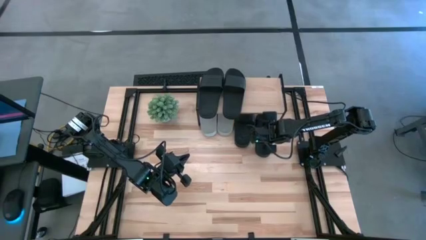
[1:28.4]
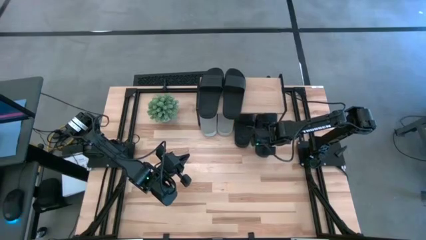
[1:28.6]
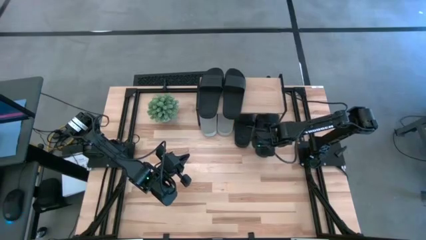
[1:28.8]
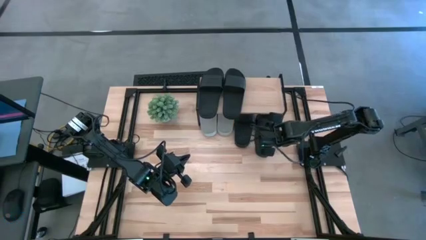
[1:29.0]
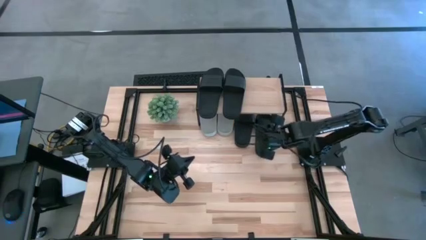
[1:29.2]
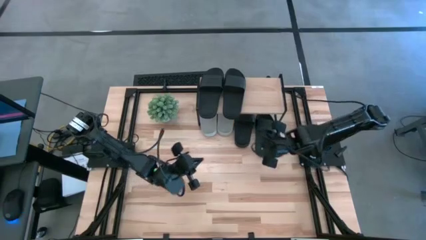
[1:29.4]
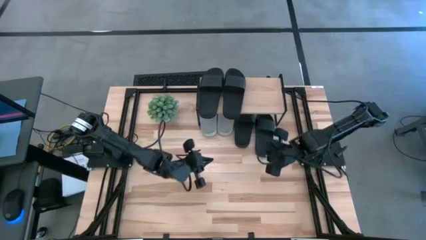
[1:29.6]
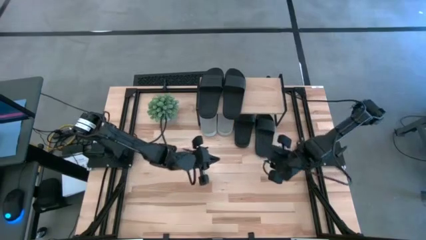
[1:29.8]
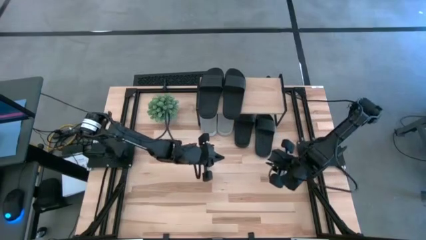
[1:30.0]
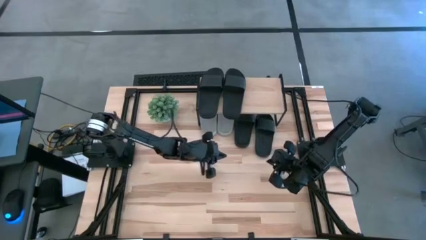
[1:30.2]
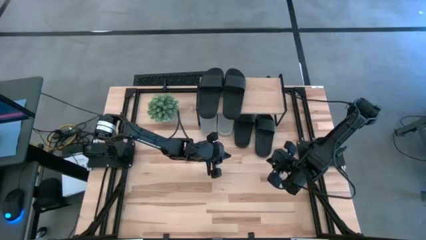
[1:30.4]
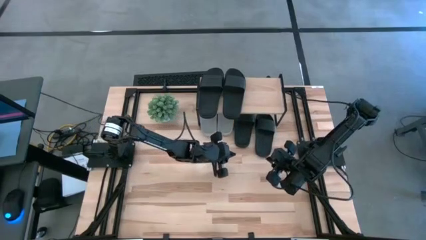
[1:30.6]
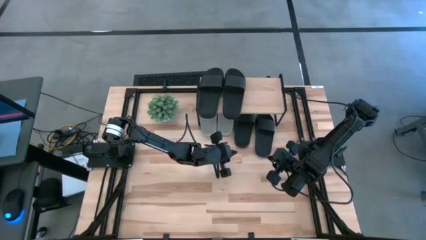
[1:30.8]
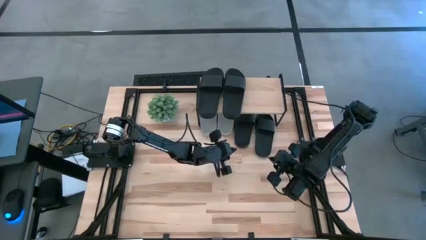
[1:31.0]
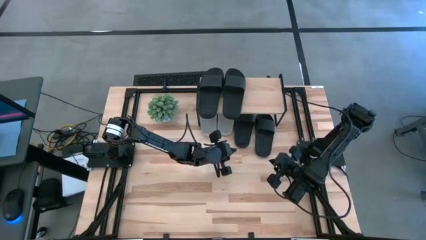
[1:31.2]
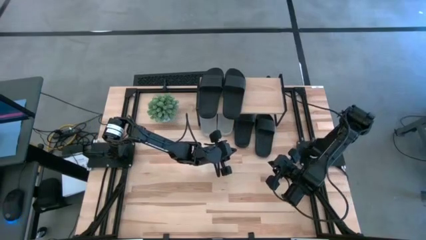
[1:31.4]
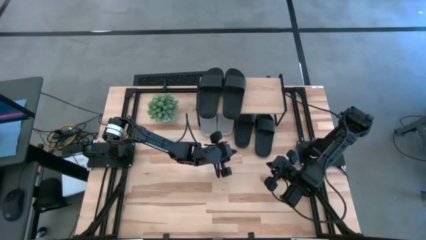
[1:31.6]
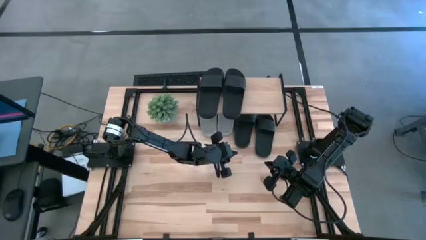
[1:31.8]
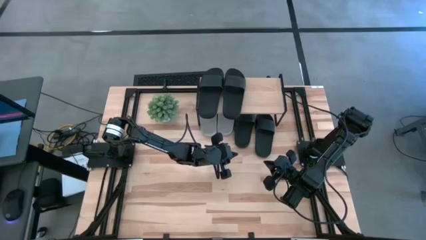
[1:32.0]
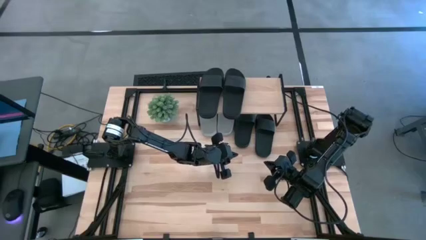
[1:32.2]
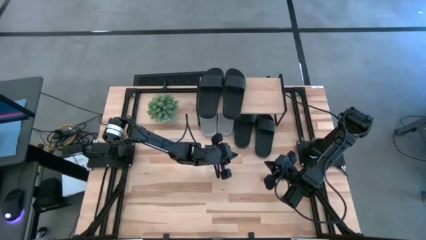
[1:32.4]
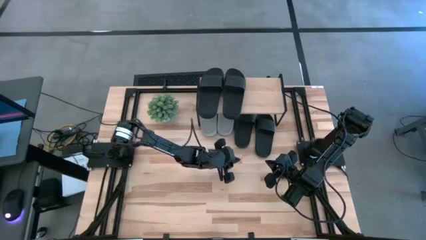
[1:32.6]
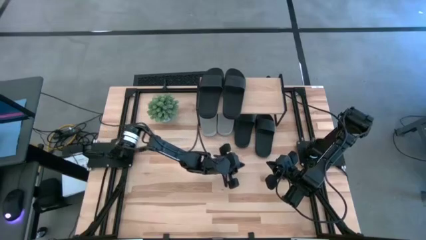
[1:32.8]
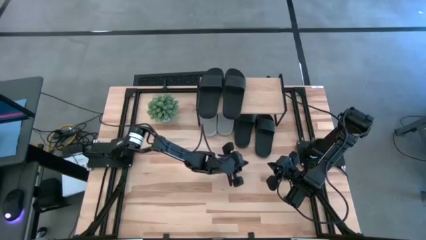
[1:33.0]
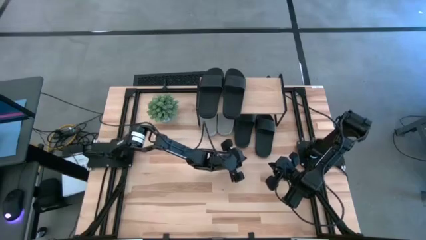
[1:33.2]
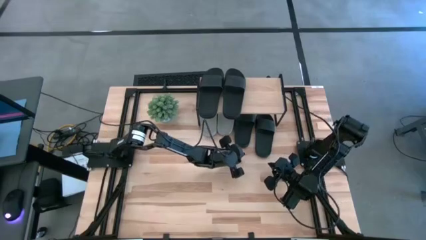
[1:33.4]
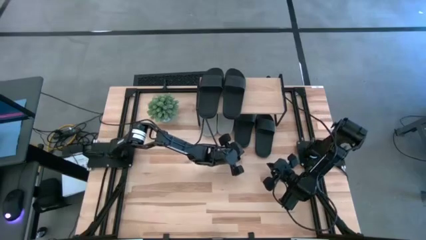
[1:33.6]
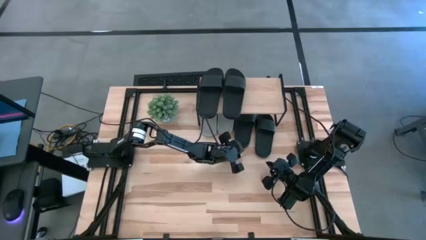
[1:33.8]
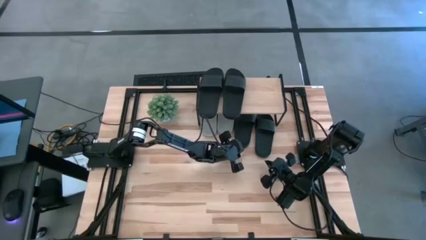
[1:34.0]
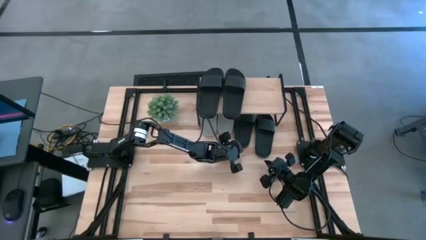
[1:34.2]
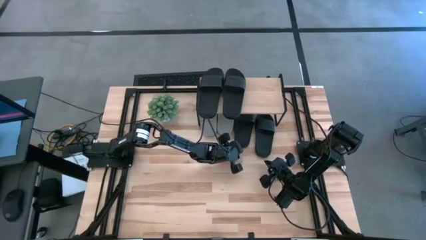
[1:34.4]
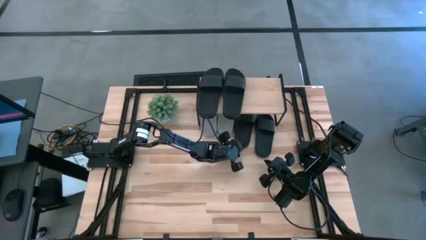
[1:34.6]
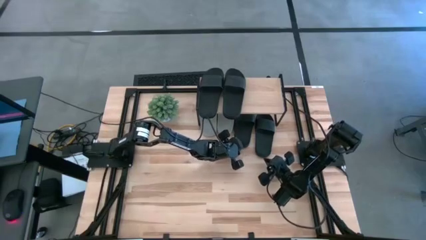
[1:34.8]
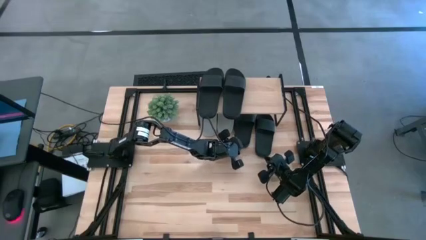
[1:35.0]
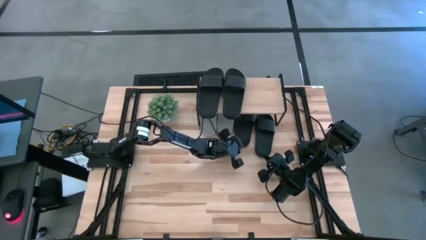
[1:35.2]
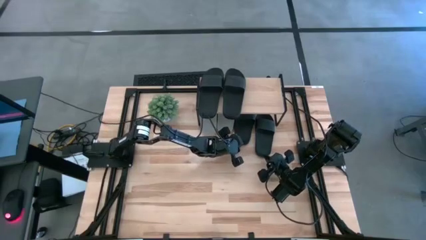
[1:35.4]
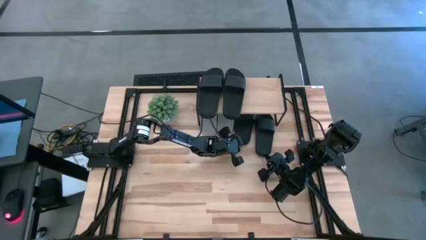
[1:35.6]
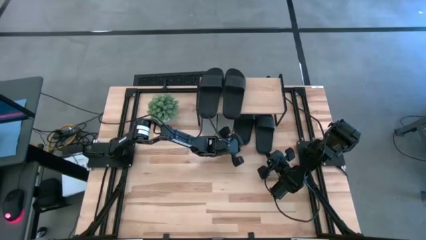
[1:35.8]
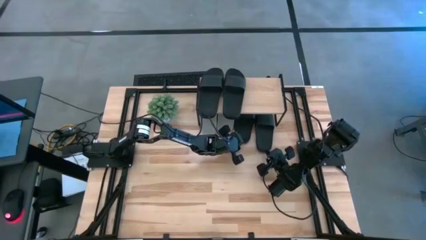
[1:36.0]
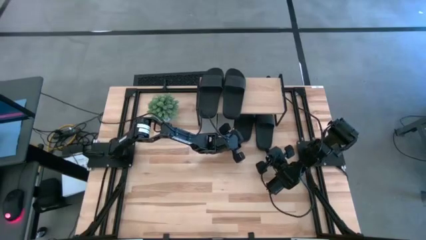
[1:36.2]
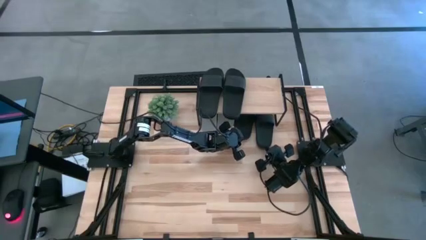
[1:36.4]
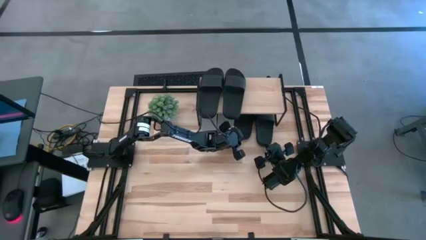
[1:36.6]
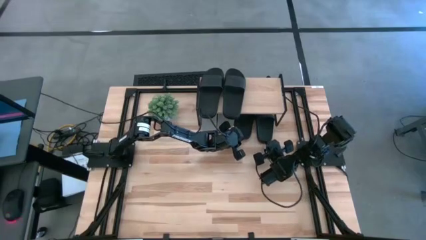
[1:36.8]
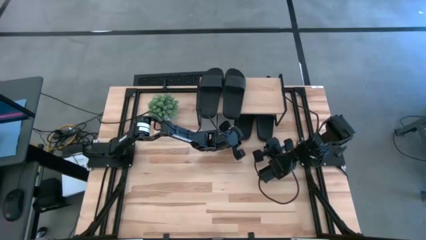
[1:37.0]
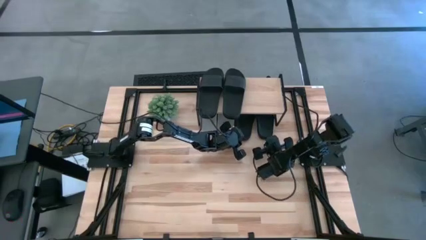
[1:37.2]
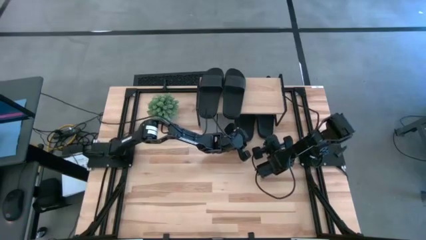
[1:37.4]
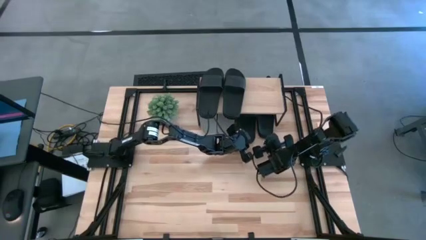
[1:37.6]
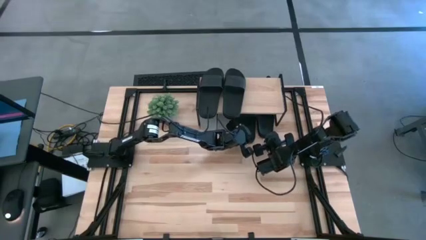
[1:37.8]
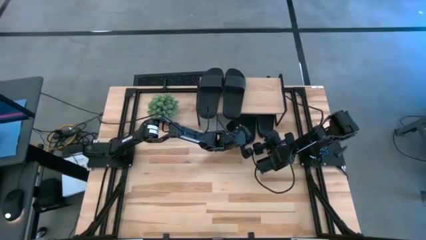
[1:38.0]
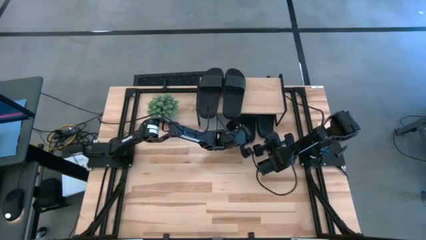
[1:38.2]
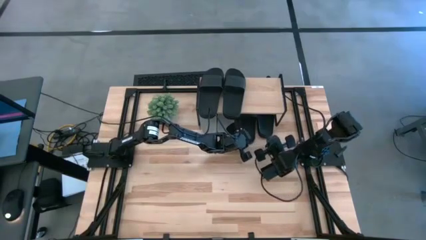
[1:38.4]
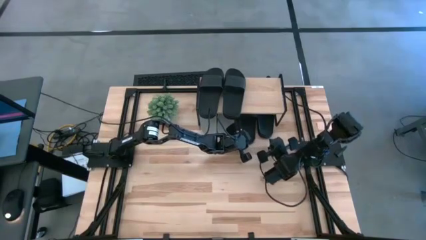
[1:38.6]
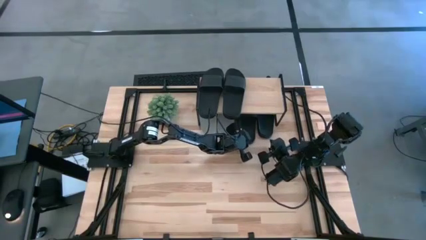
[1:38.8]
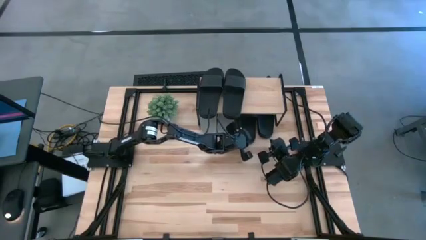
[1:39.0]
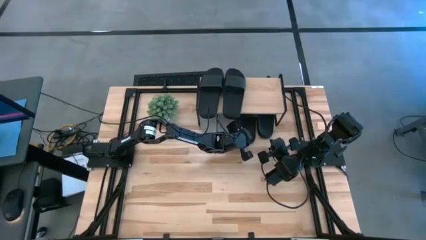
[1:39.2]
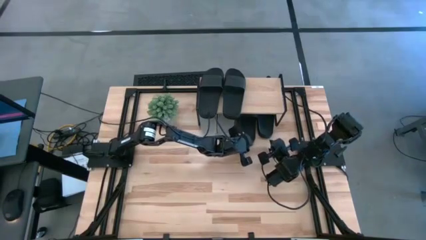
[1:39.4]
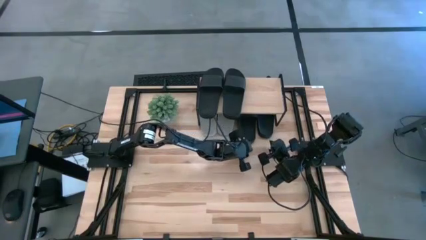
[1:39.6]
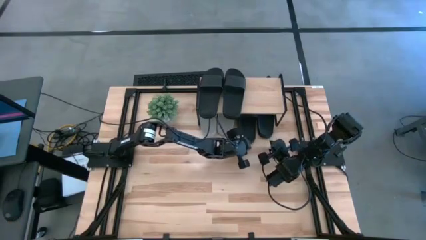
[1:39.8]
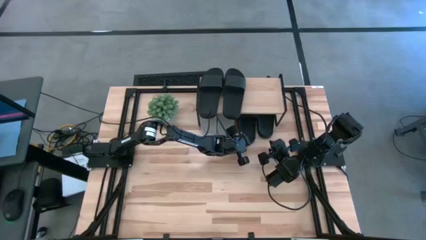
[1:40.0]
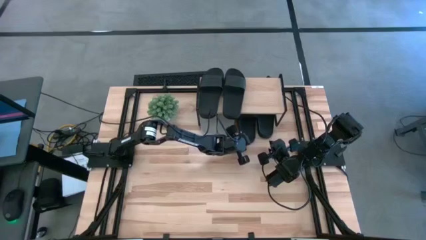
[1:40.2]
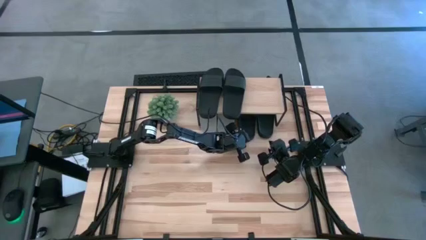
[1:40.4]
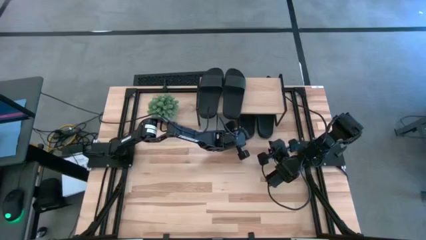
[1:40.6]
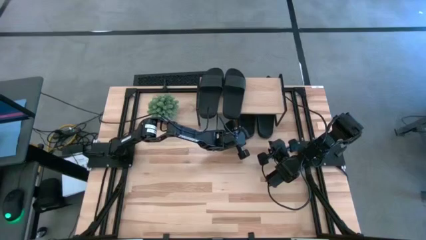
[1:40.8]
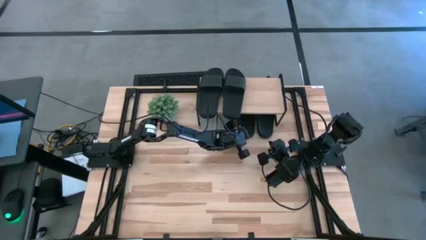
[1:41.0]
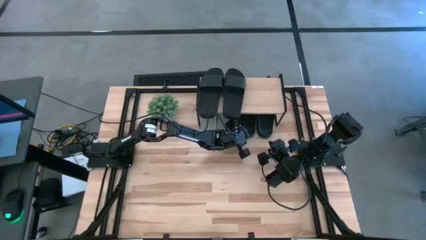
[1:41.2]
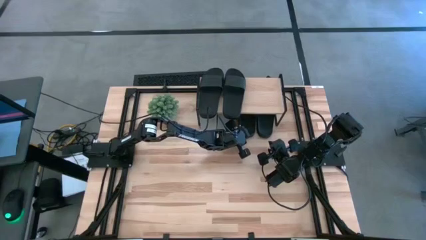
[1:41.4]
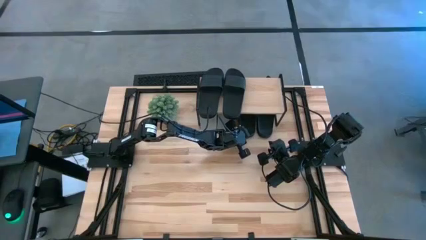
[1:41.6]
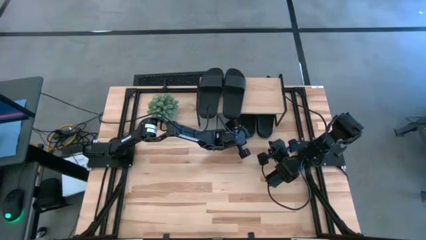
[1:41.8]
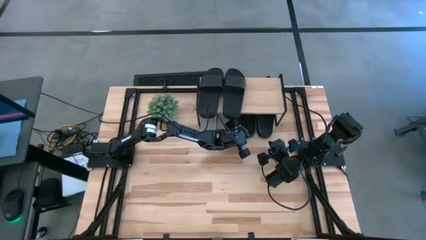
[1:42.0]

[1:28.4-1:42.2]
Task: Pick and place slides into the shelf
Adjust the black slides under the shelf to align the position

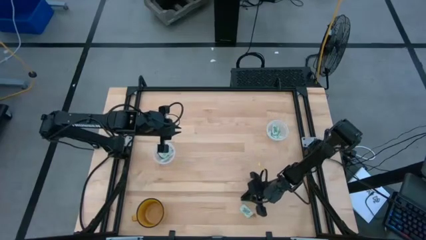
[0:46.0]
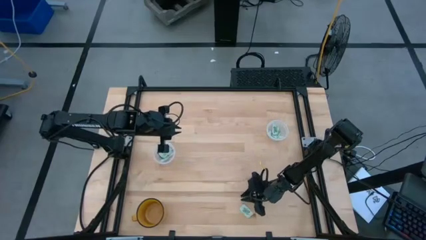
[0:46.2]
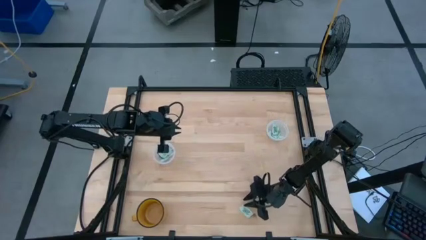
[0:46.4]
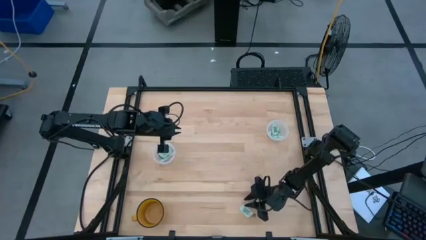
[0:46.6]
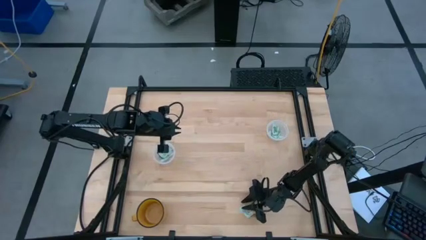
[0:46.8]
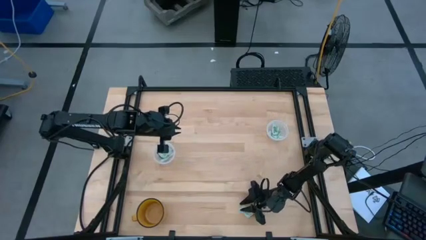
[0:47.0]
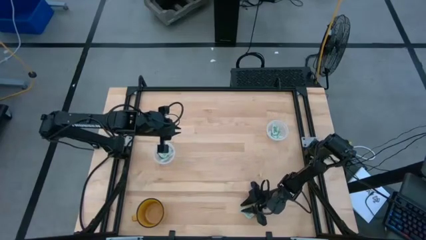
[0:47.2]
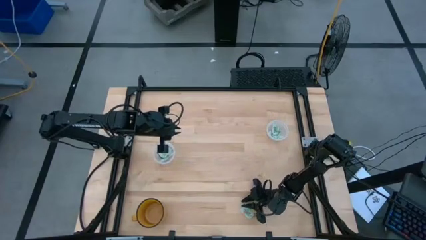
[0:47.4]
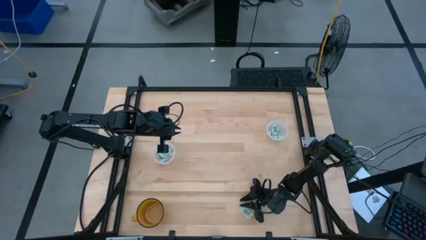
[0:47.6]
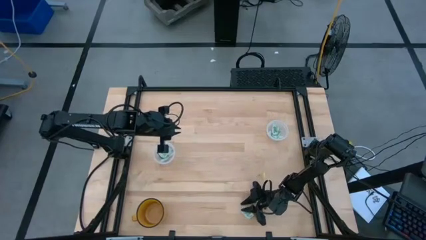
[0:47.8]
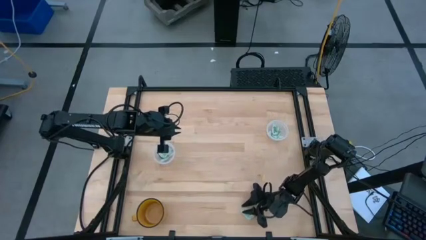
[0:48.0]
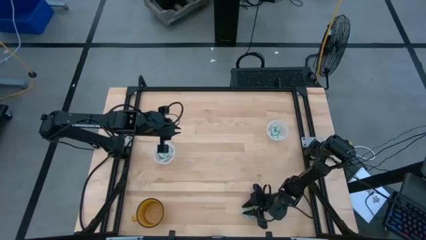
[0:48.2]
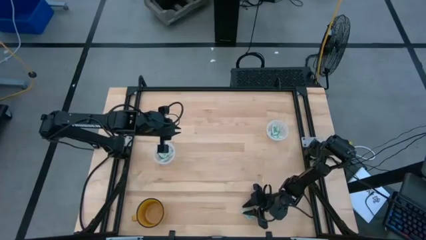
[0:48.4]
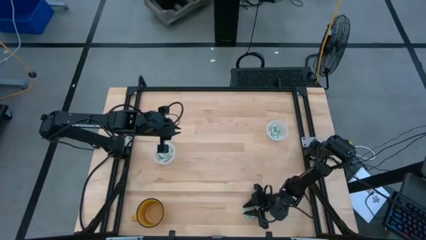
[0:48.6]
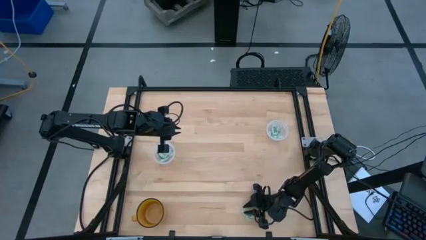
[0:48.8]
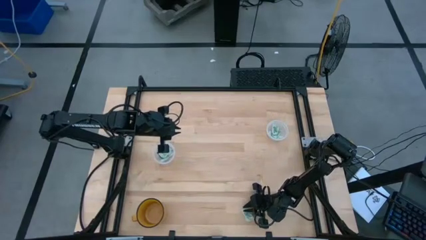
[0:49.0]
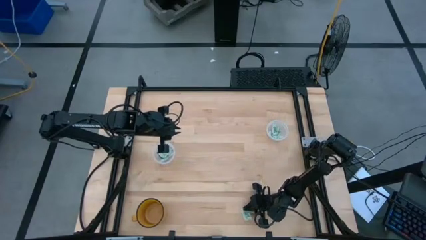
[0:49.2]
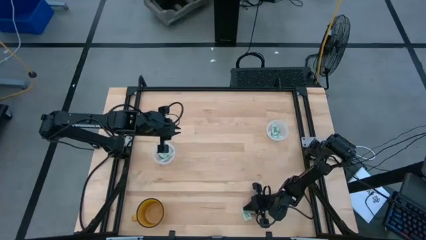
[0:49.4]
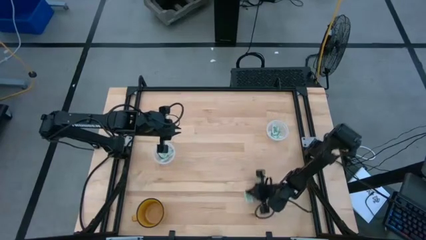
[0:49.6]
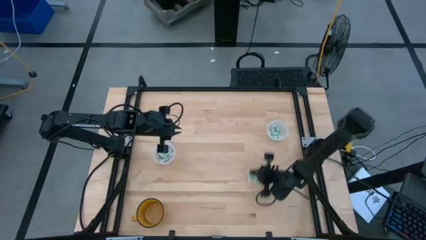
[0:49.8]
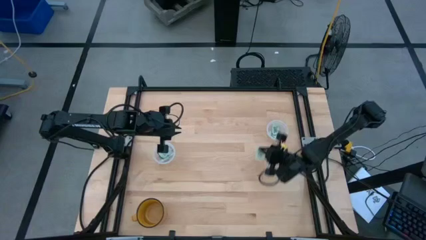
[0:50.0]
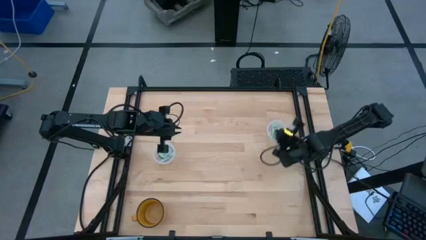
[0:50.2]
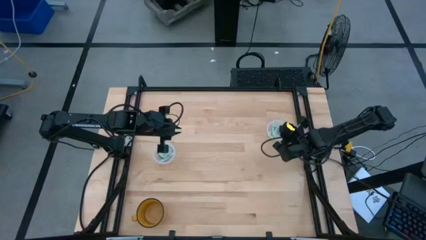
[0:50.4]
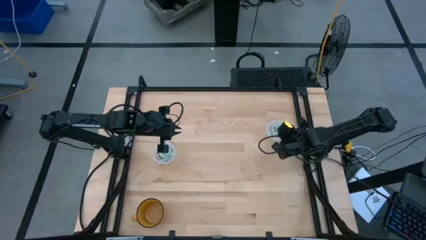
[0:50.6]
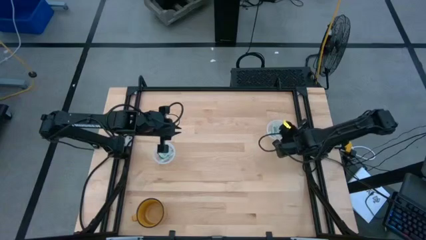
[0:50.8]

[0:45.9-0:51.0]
Task: Pick and place items into bin
Put the green stevia packet into the right transparent bin
